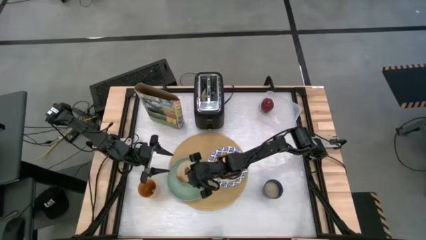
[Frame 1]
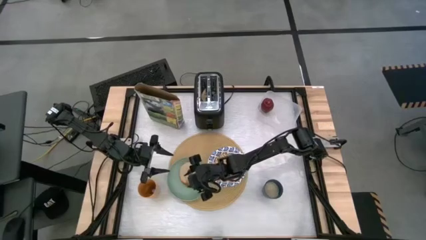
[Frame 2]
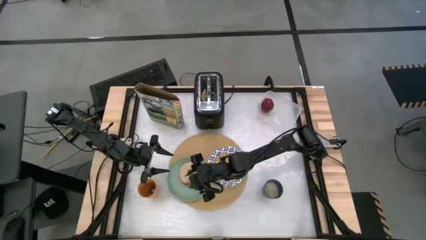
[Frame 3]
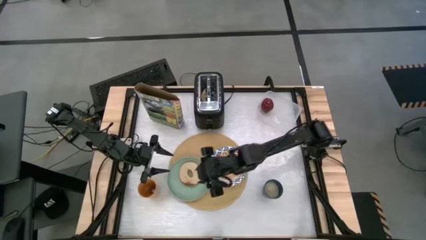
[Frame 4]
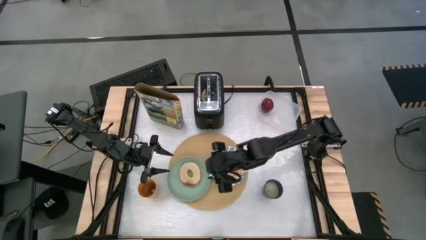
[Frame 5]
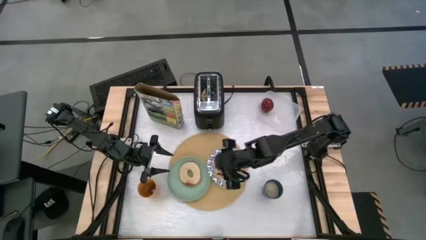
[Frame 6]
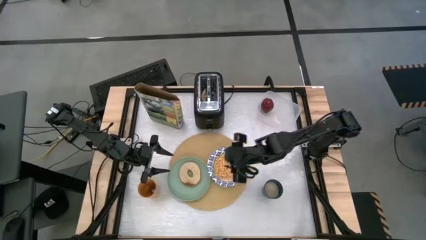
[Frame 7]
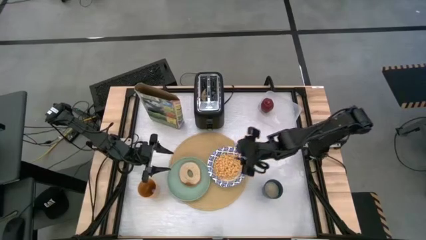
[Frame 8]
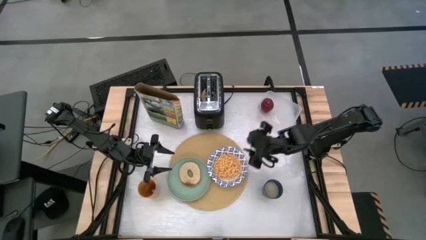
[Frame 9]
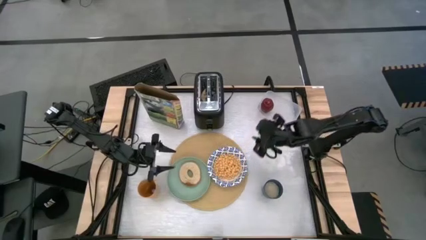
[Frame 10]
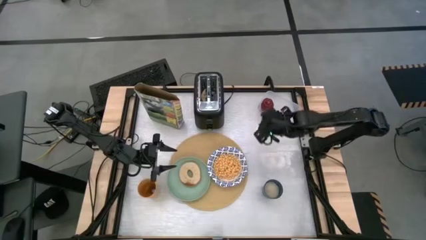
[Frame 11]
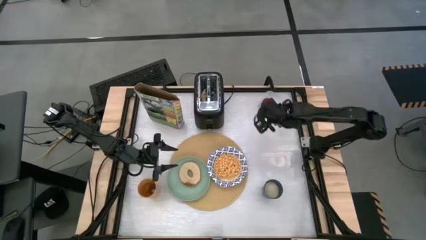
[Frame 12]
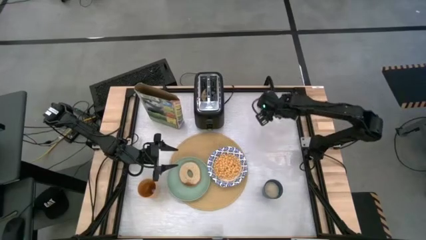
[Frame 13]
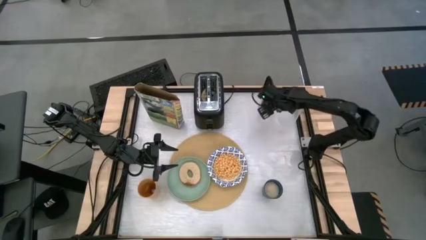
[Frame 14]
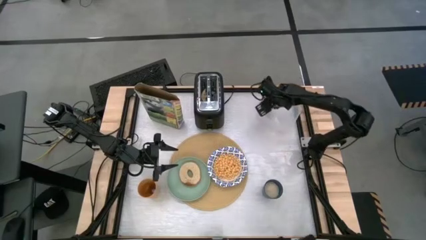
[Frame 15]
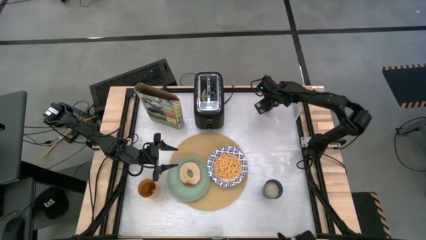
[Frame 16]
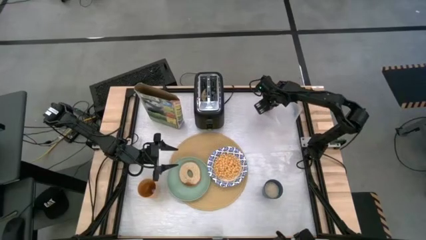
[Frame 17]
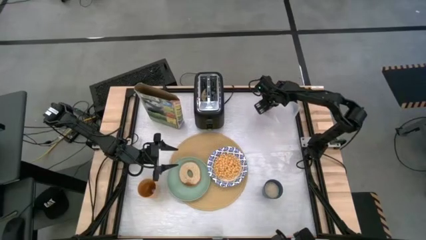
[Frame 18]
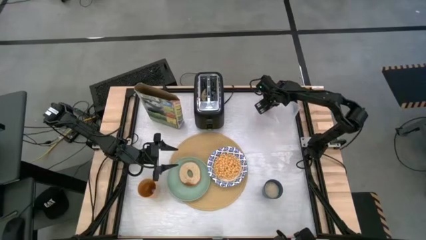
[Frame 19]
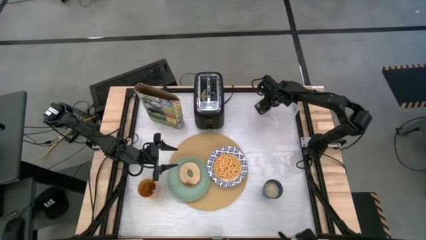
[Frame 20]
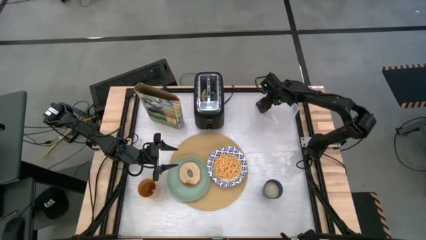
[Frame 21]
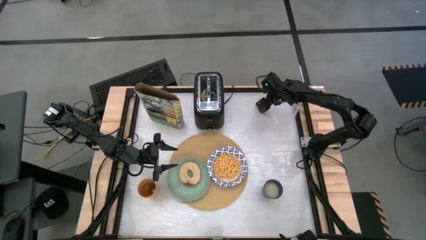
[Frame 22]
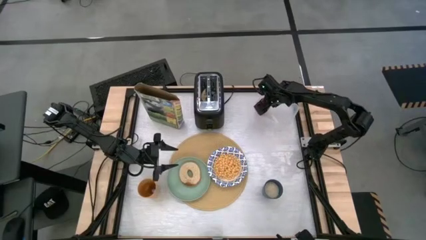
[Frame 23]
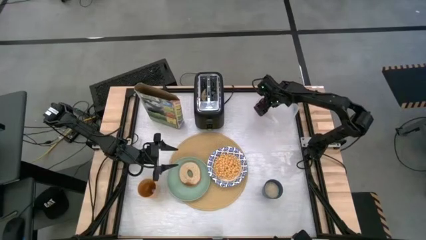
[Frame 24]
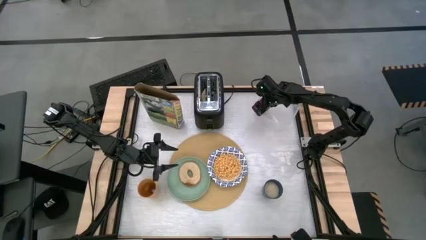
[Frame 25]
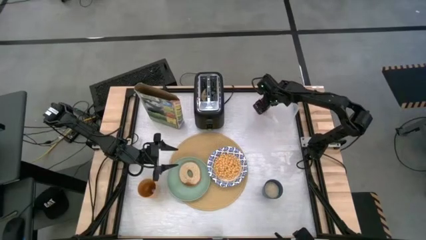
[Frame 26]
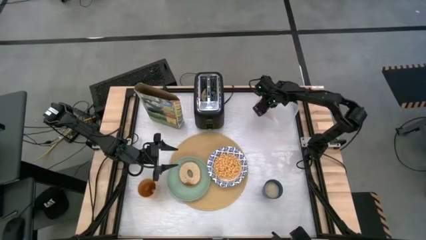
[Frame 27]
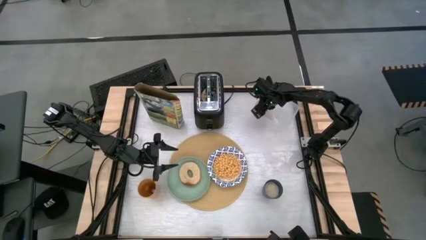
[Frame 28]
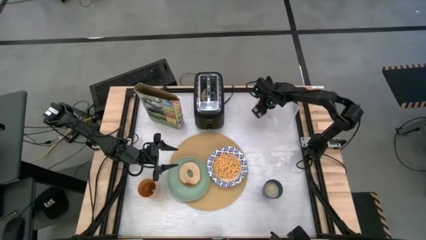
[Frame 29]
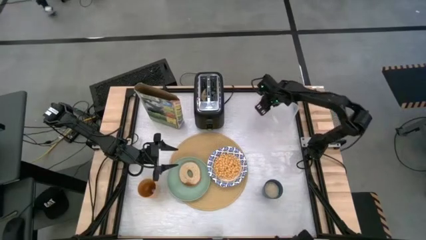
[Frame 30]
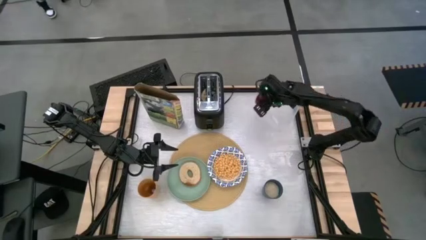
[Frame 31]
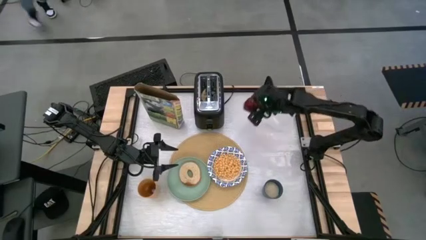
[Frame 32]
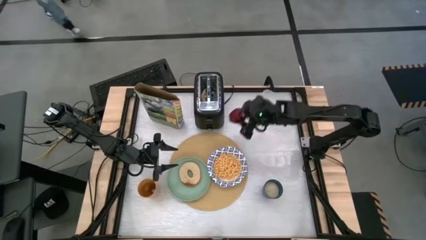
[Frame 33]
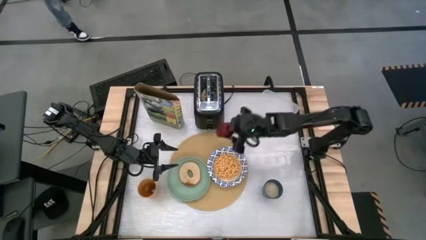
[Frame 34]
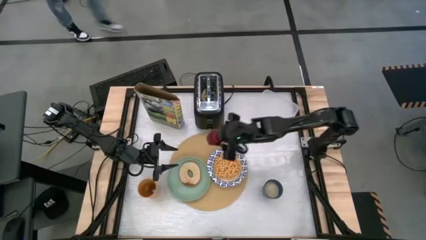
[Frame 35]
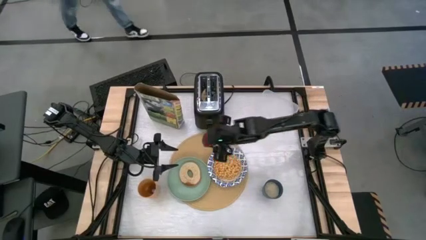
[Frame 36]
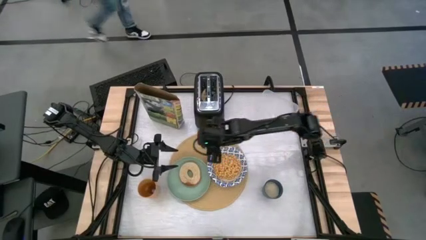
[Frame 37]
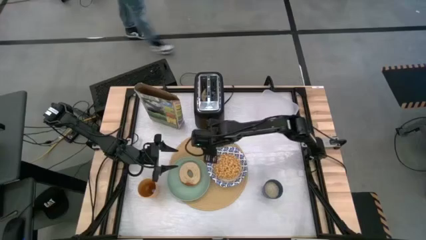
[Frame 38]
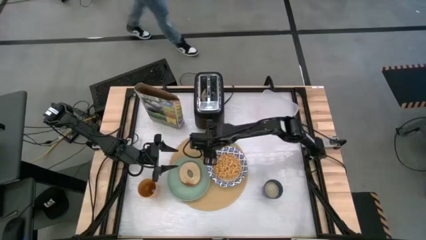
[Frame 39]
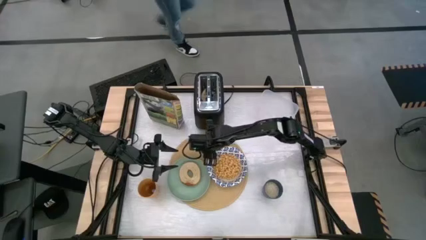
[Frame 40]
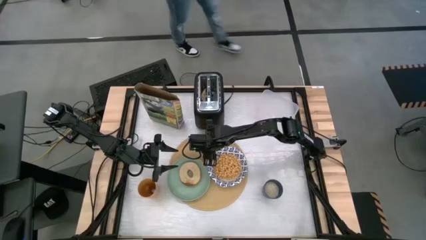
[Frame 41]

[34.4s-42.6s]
Task: Arrange a breakfast setting
Put the apple on the mat

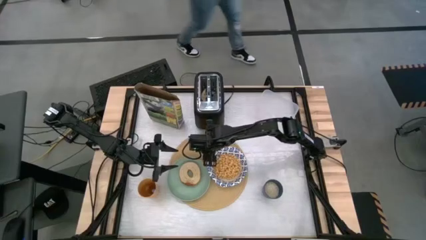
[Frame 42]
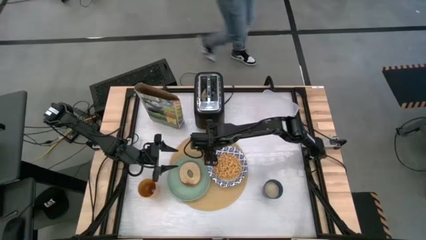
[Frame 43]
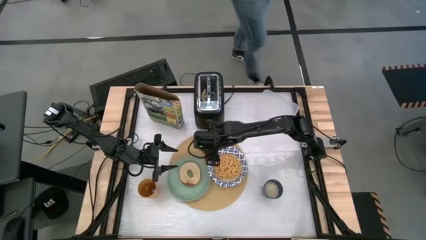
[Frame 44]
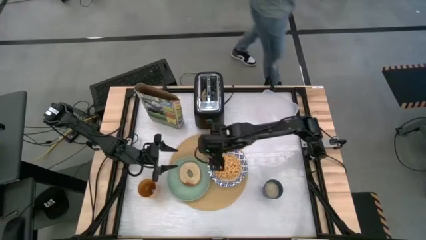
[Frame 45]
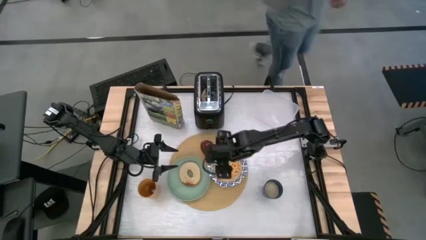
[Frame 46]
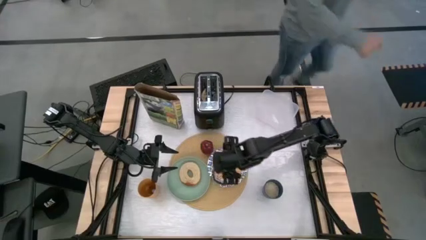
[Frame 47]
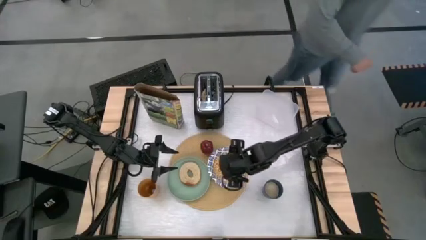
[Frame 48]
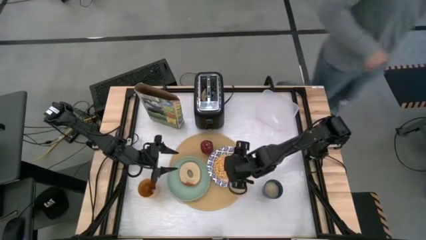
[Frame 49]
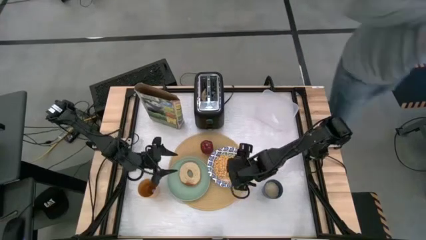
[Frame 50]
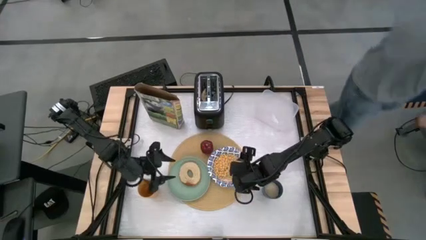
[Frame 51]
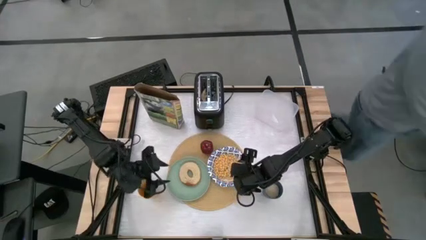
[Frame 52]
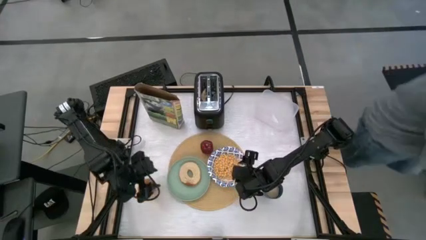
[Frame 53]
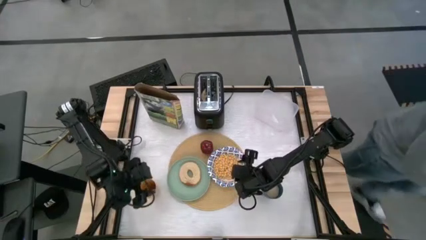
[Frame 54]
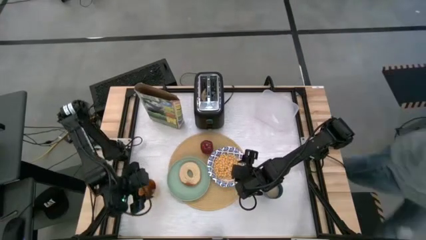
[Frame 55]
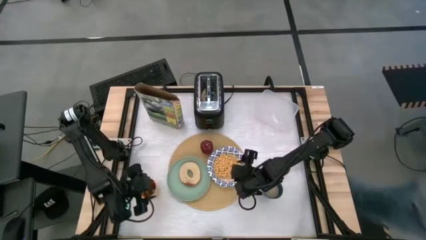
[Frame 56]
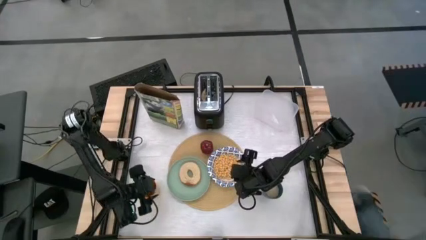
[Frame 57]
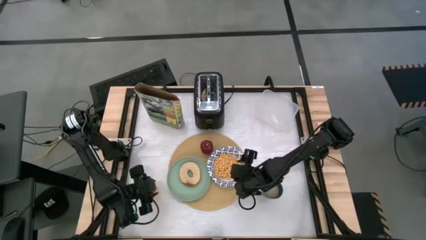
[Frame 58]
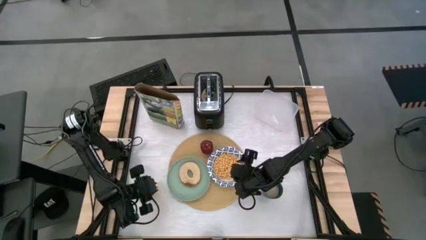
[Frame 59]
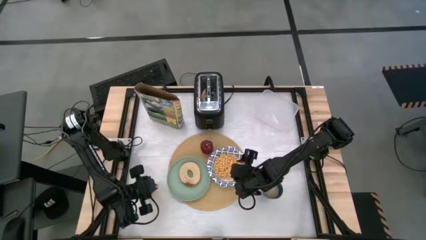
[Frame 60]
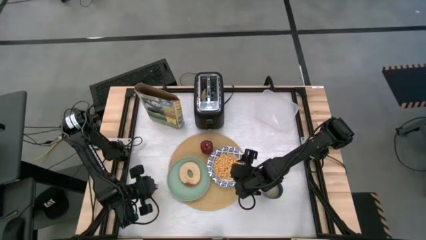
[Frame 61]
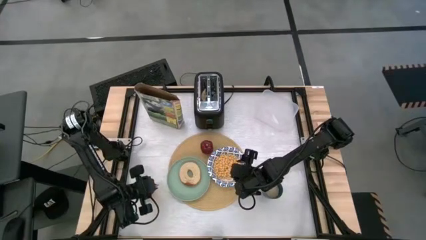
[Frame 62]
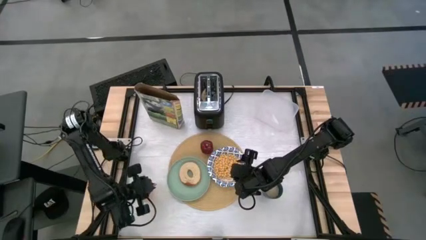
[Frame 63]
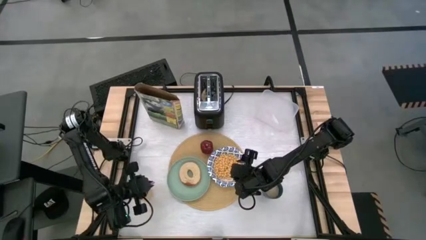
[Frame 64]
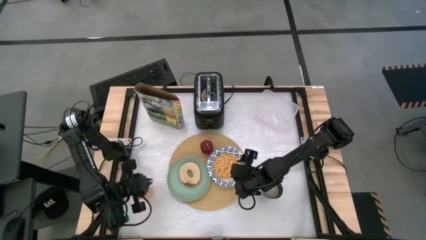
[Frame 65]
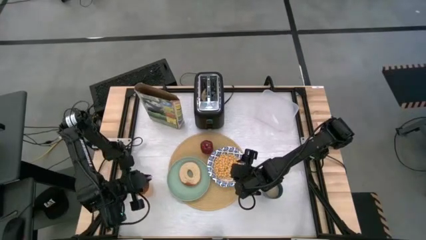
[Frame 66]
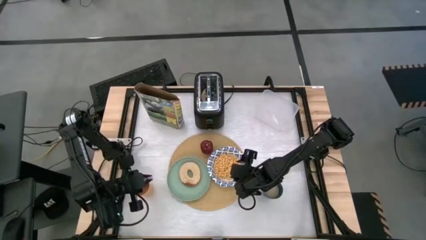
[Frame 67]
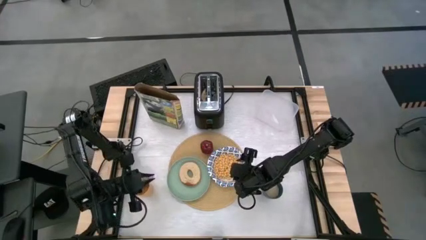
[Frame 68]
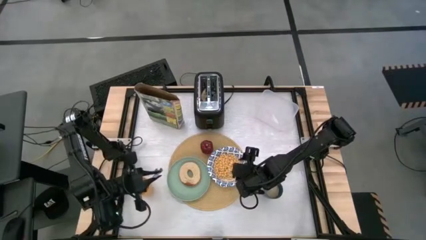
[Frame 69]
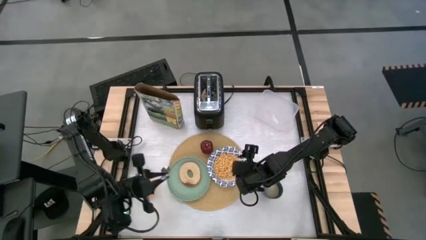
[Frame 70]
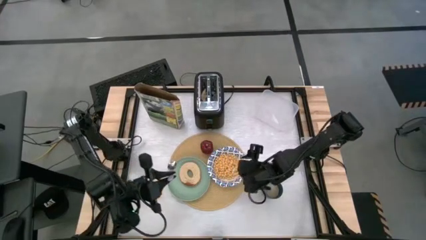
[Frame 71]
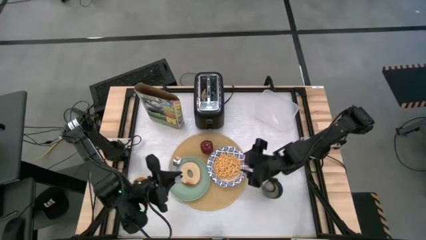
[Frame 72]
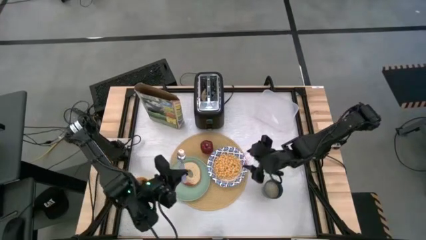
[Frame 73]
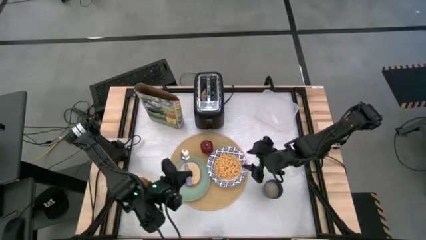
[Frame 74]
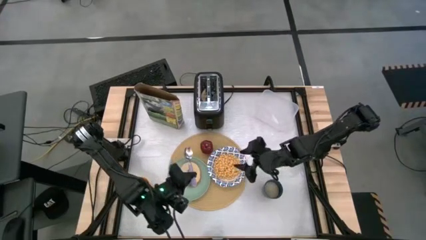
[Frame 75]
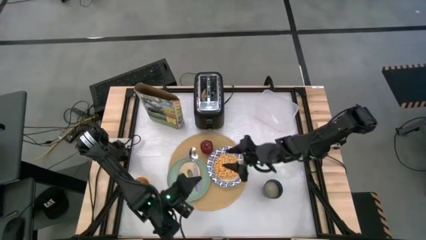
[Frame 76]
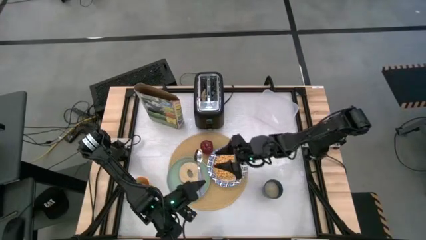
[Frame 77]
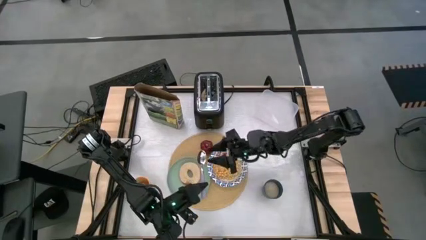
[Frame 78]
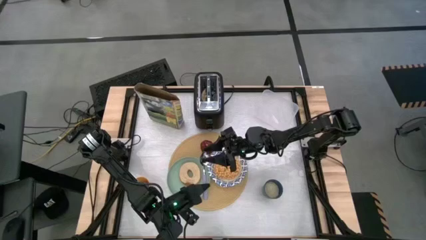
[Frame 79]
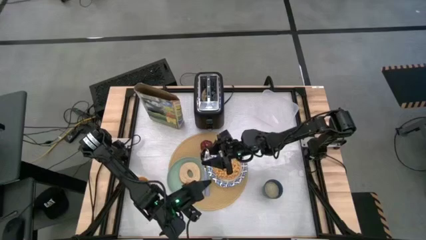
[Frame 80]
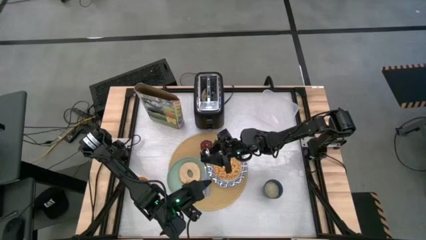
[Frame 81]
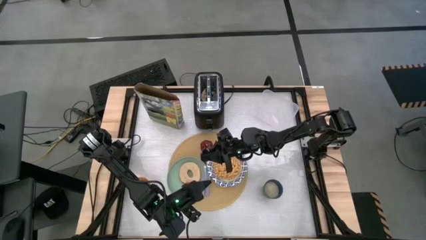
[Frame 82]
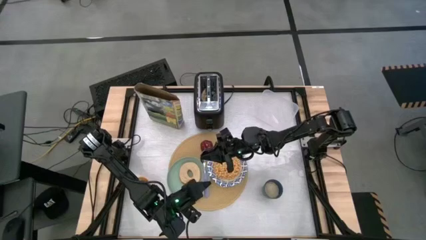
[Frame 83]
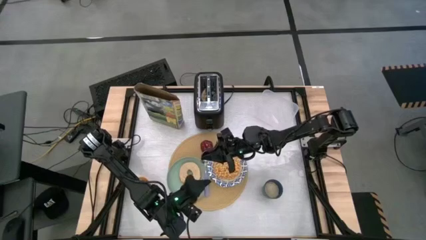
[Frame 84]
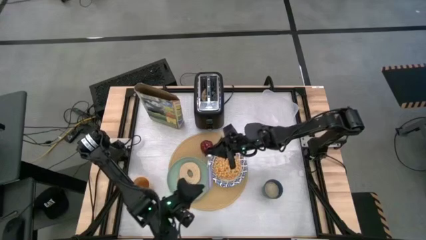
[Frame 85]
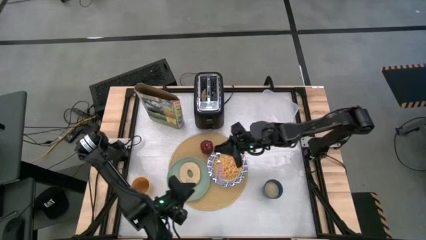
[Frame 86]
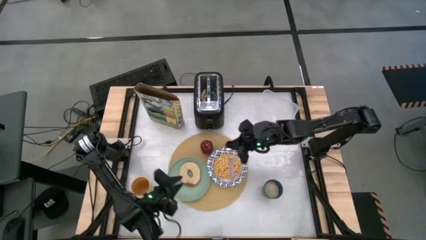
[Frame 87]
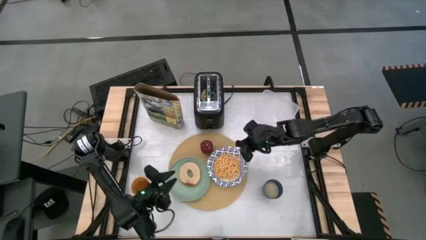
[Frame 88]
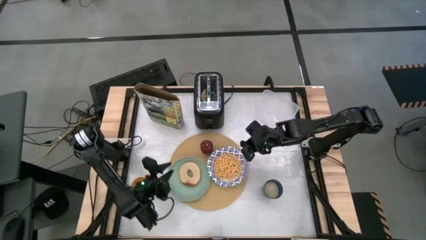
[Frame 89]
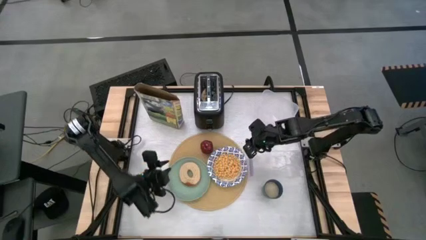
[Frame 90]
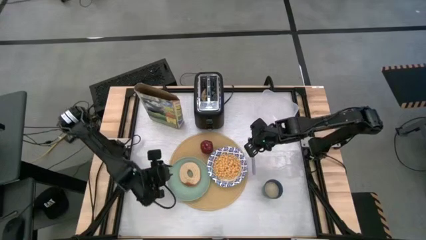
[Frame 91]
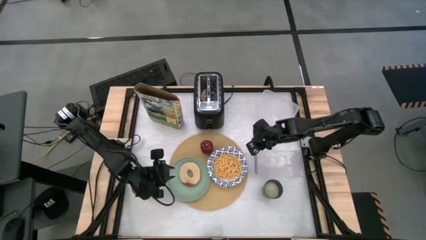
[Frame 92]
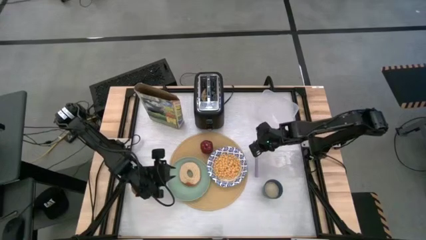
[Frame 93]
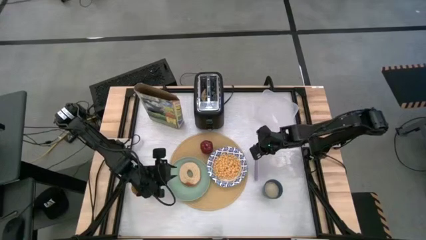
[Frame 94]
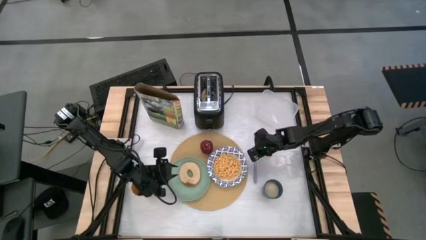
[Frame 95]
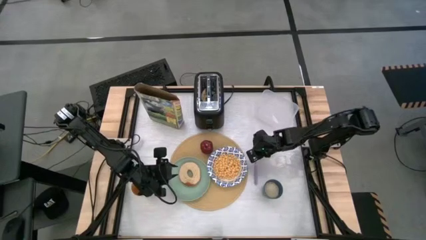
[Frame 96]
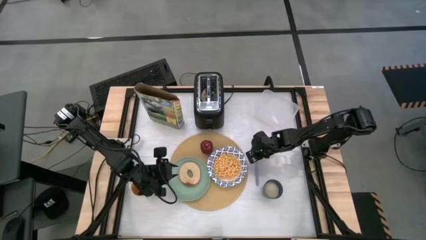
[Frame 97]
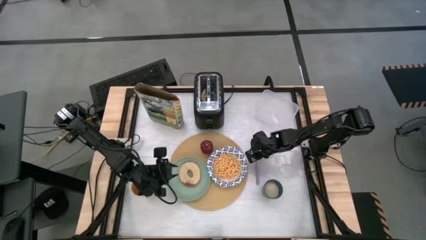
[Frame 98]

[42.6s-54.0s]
Put the spoon on the table beside the mat
